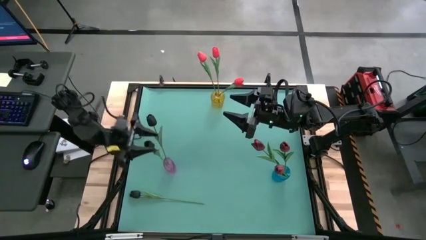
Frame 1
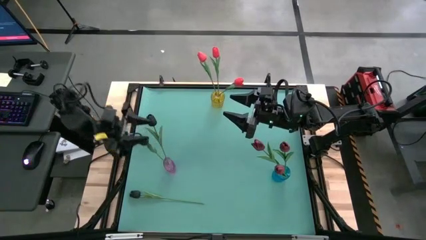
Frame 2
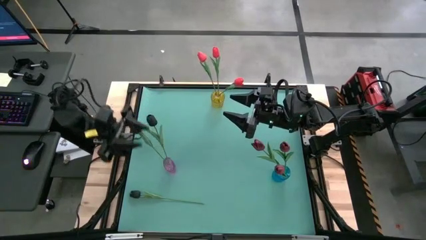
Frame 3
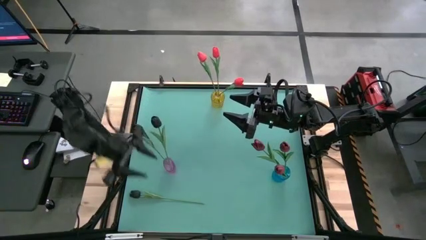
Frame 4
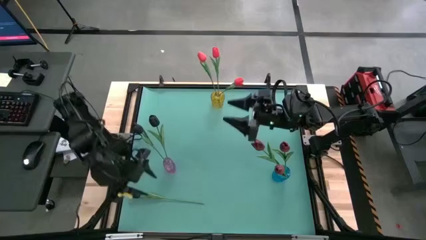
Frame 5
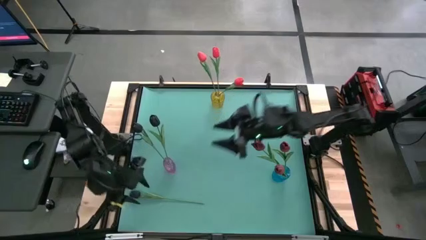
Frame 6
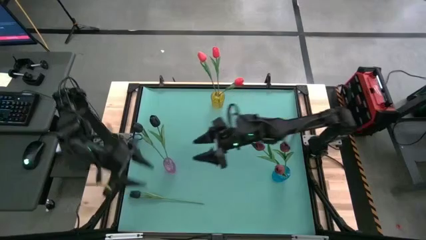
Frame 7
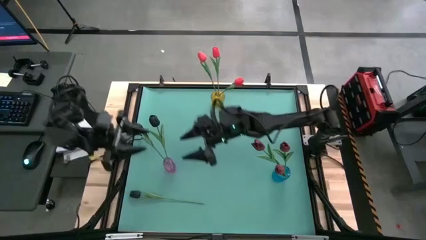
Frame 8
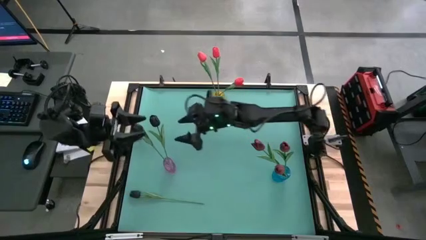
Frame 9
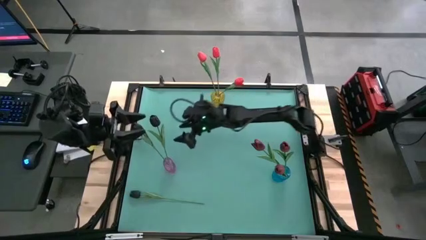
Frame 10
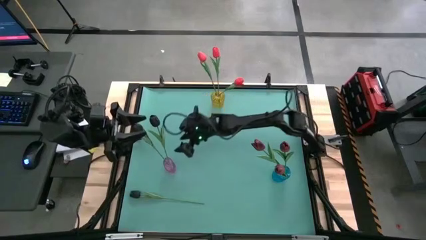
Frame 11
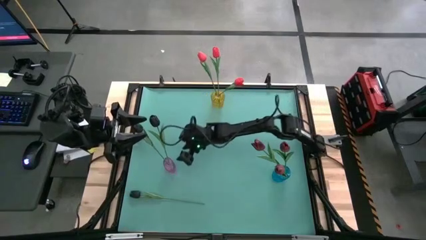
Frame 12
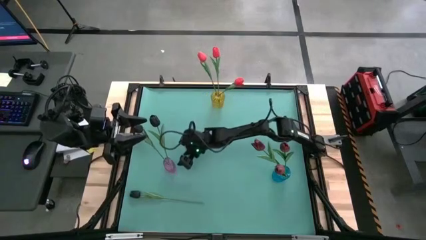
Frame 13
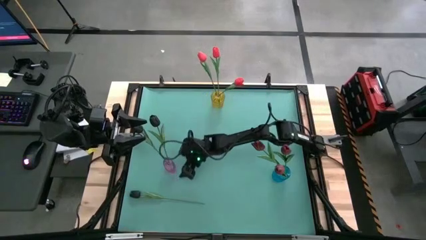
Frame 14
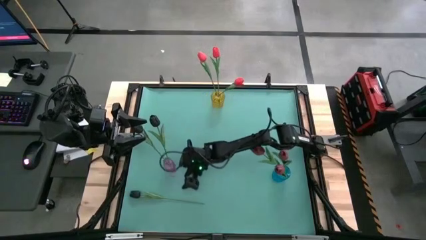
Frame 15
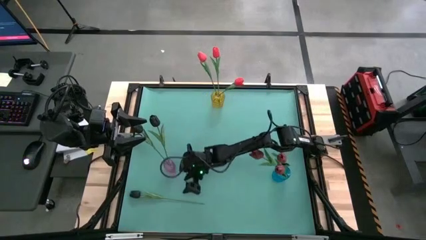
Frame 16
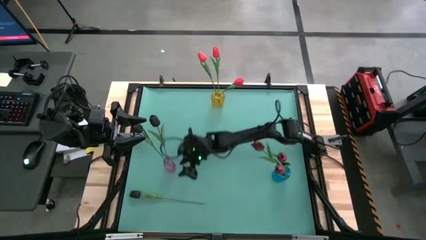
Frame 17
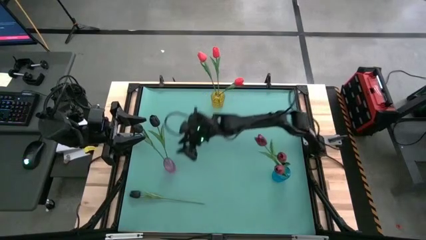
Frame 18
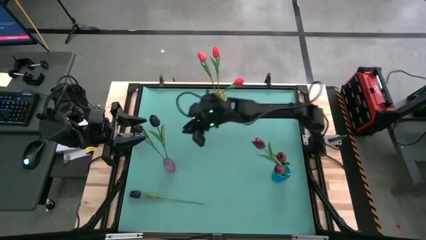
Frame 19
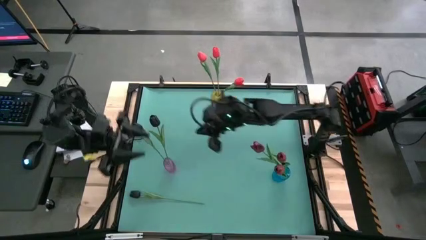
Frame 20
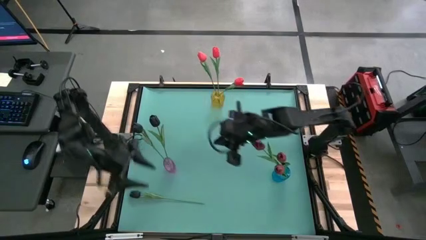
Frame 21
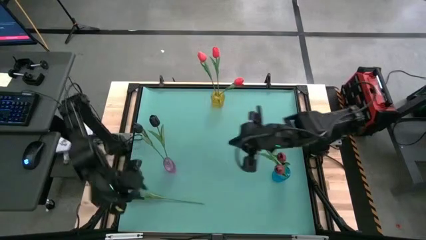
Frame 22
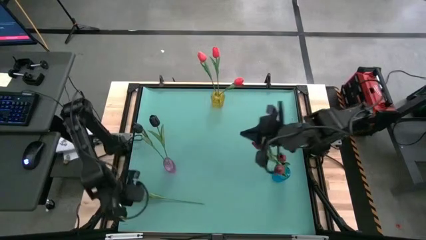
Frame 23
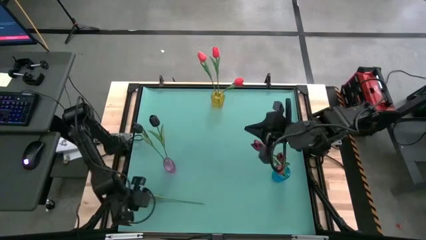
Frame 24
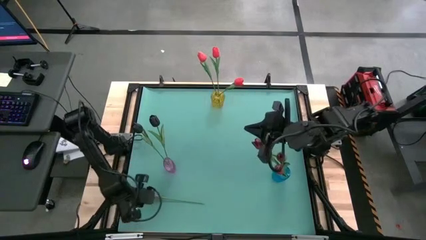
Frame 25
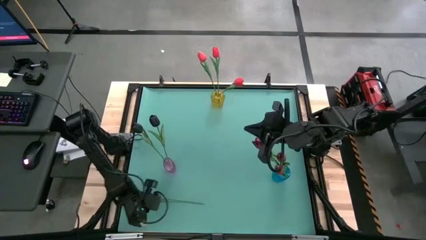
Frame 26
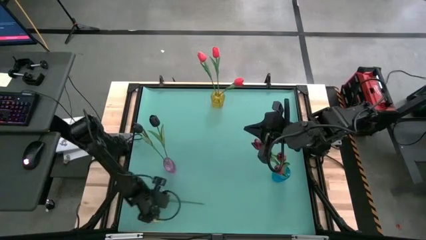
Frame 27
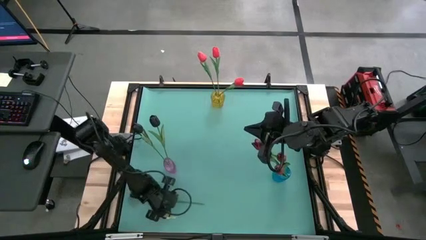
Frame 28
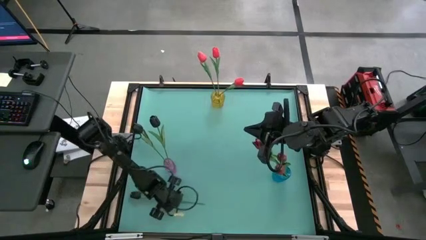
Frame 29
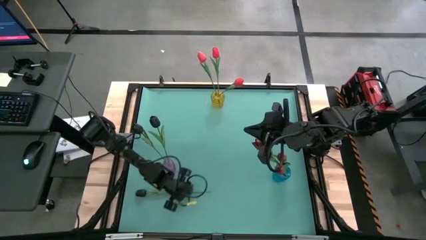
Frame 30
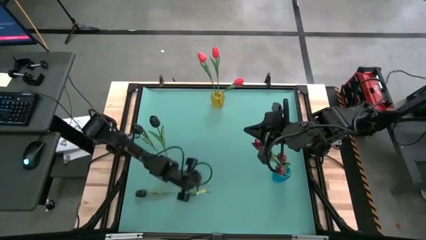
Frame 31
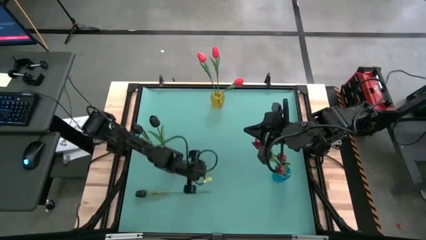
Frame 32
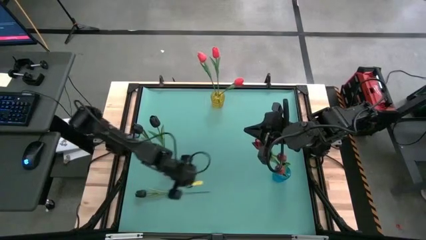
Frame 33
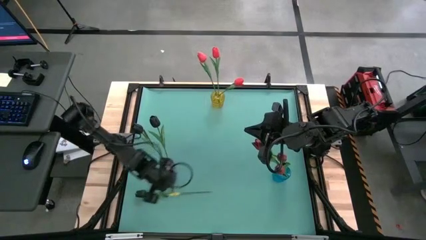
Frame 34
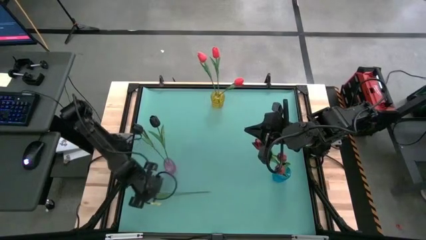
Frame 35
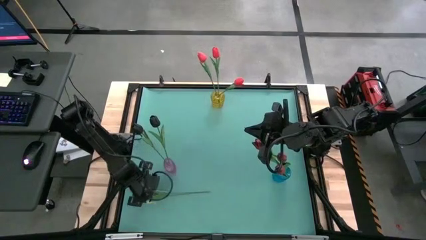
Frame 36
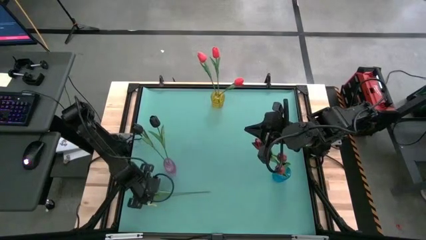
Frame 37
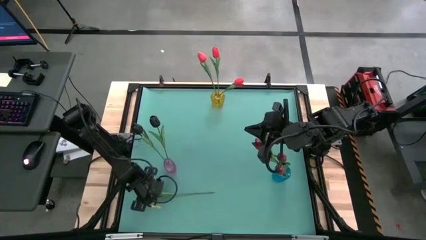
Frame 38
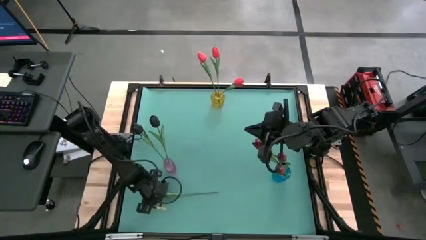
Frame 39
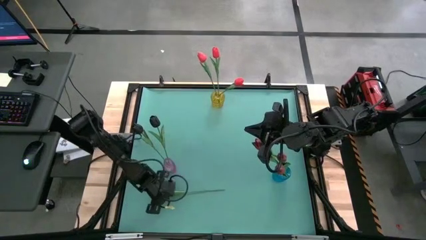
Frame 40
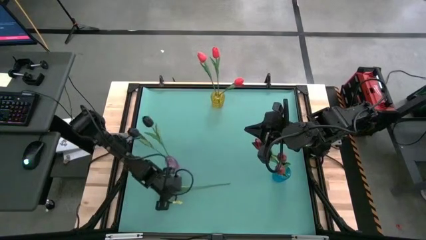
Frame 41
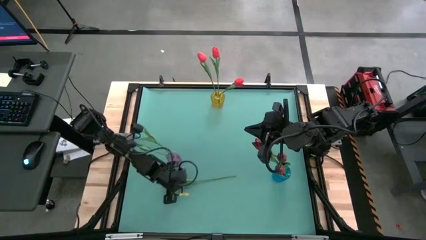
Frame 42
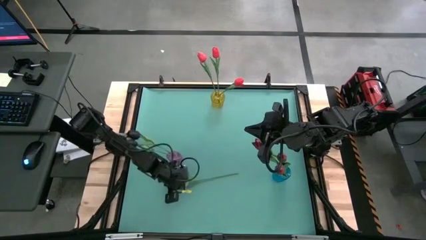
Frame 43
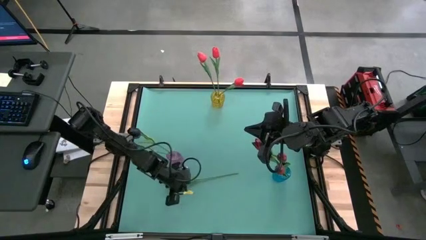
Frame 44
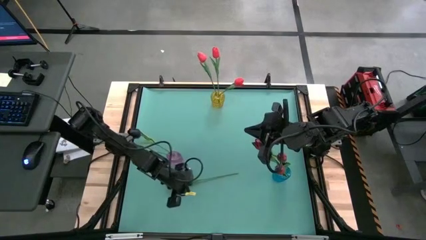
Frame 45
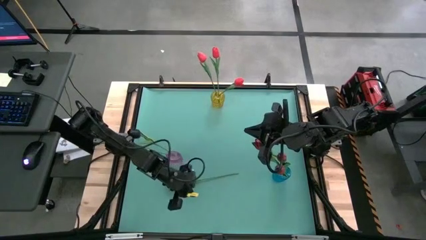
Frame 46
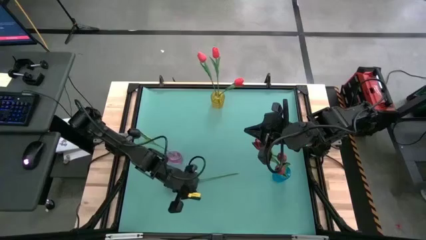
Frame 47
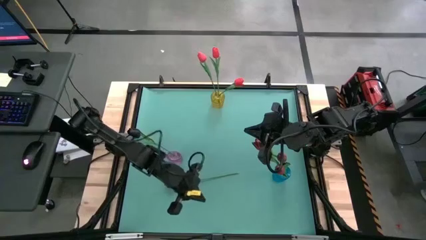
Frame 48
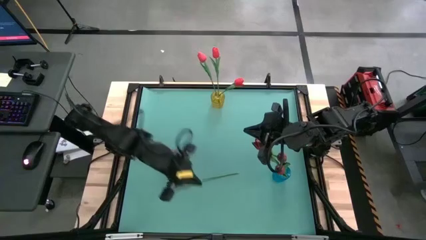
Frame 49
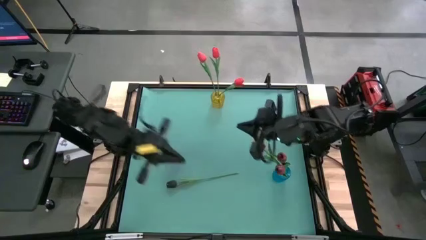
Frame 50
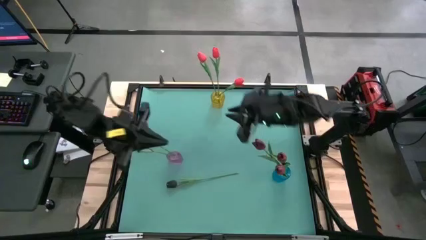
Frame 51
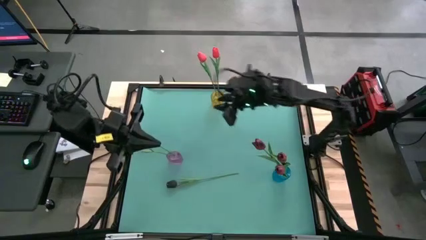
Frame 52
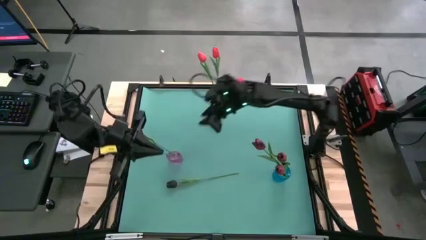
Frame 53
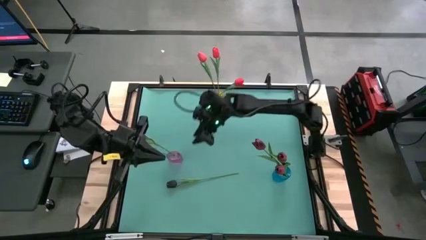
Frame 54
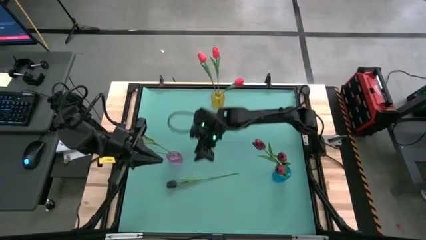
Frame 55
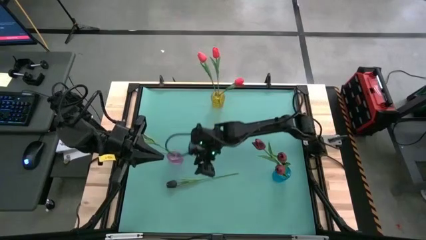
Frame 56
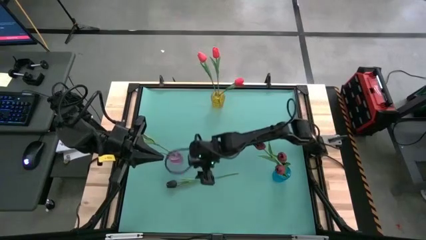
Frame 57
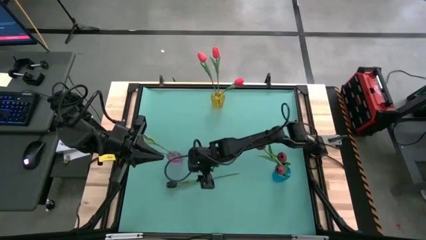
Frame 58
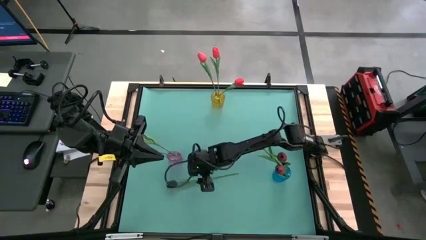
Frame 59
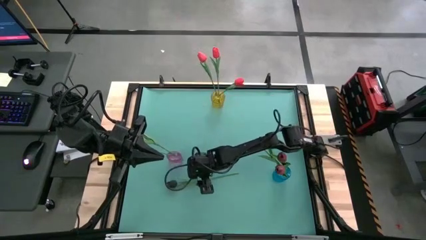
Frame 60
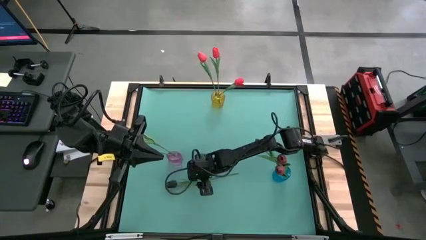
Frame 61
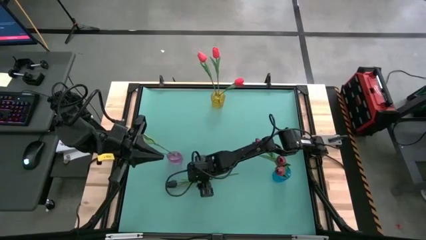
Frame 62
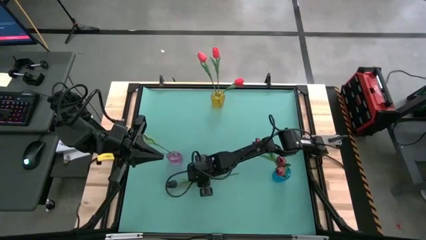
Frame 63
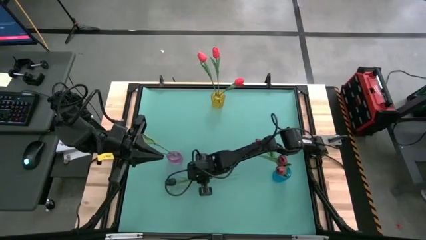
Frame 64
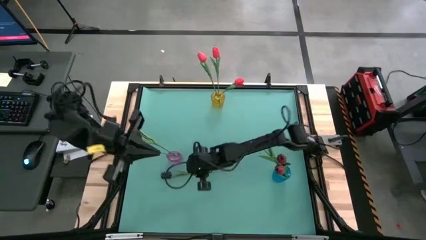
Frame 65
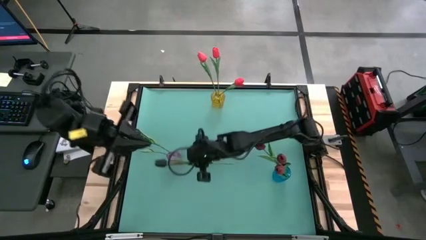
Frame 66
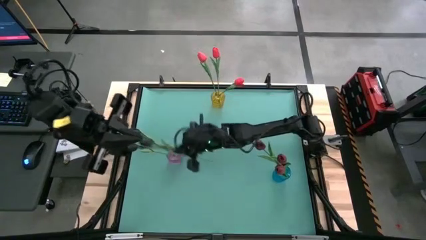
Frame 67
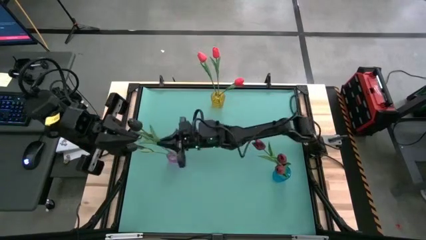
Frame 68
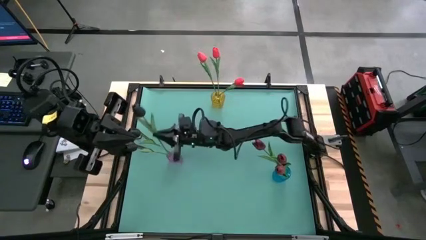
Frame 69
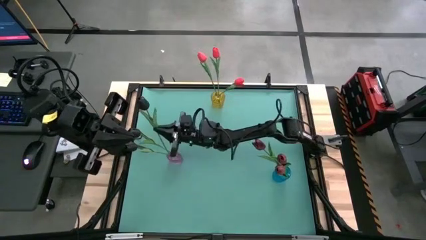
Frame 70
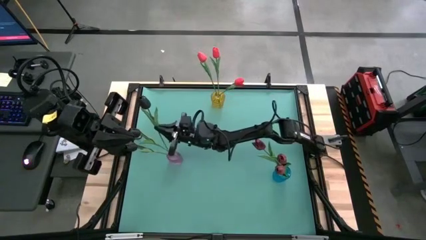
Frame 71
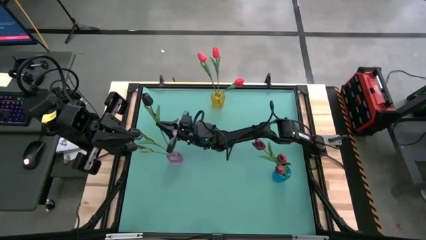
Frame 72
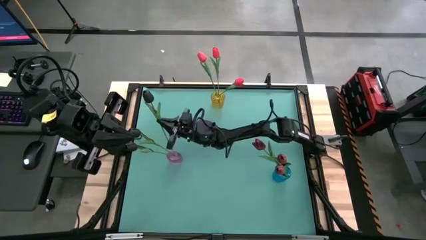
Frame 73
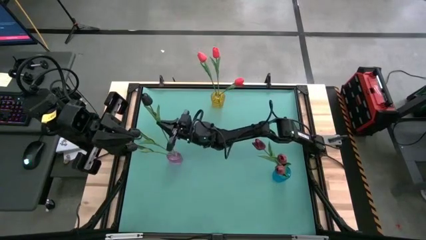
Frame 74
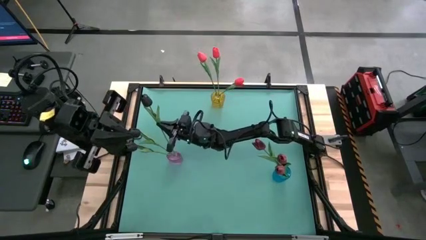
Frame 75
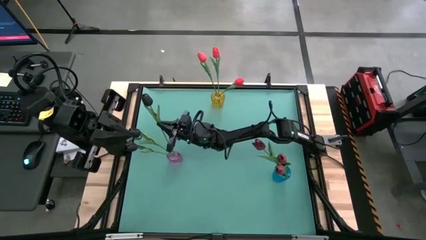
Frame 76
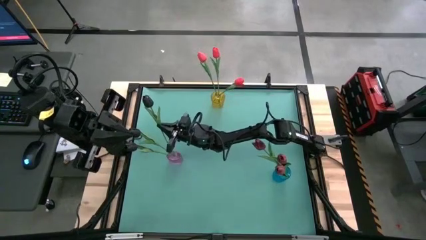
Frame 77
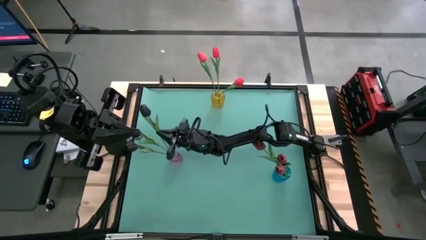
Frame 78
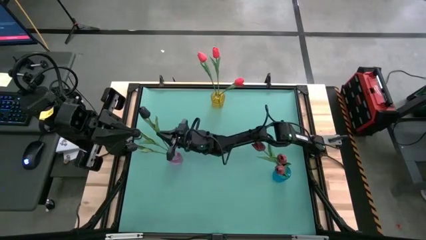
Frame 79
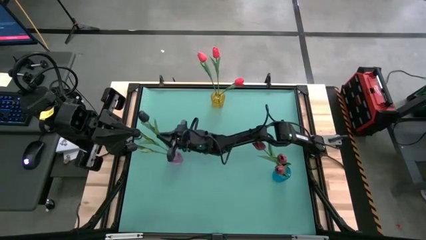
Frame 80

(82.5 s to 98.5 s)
Task: Sort flowers into vase by color
Put the black tulip into the violet vase
